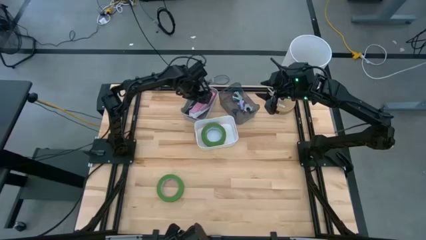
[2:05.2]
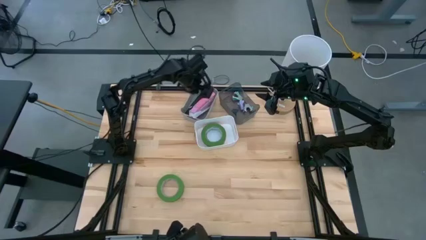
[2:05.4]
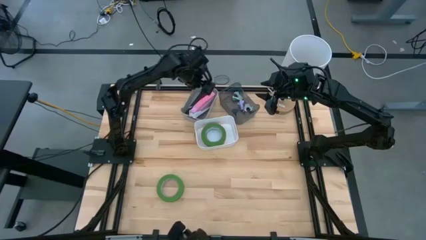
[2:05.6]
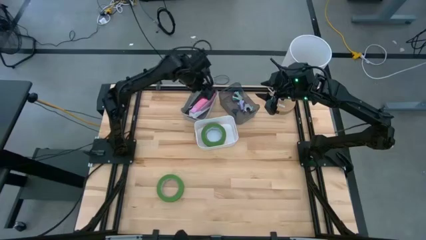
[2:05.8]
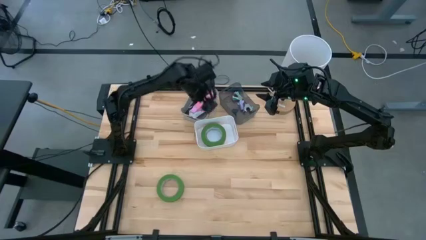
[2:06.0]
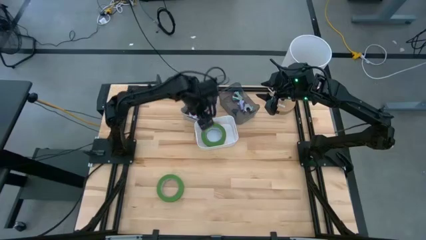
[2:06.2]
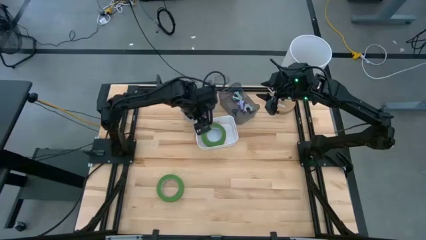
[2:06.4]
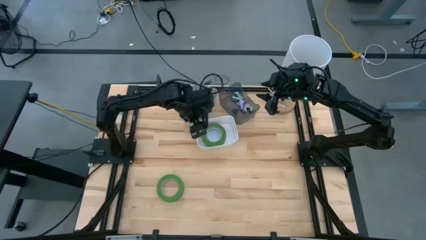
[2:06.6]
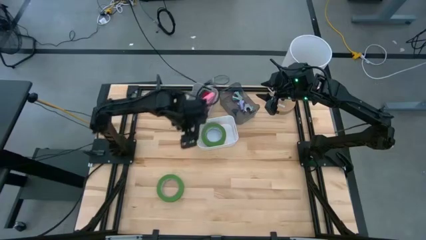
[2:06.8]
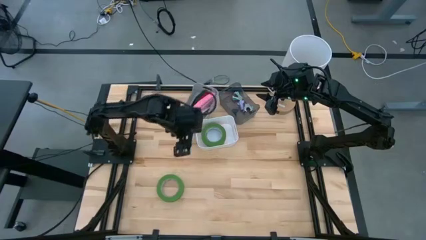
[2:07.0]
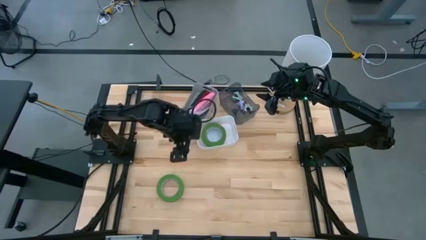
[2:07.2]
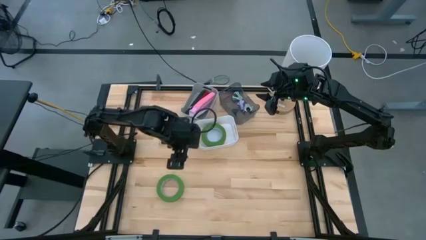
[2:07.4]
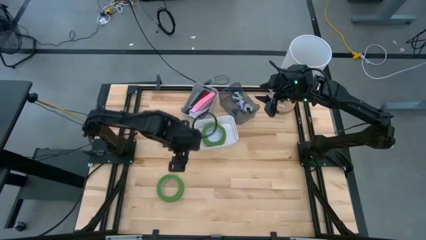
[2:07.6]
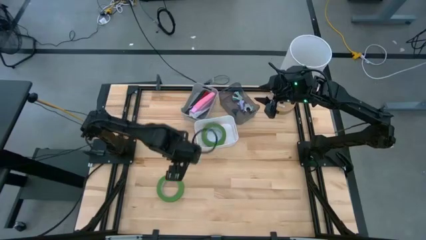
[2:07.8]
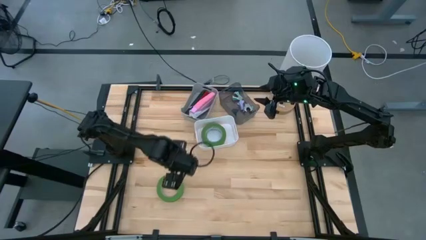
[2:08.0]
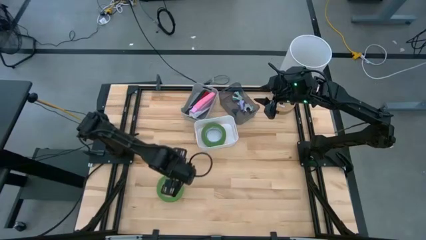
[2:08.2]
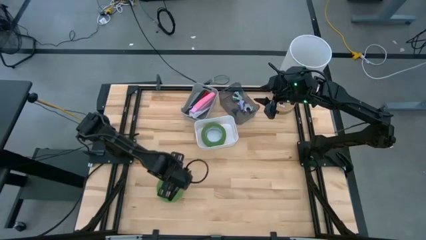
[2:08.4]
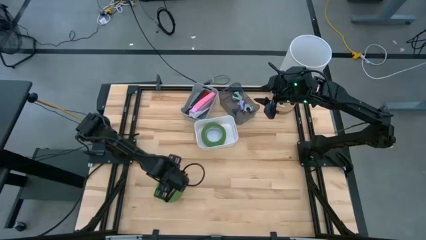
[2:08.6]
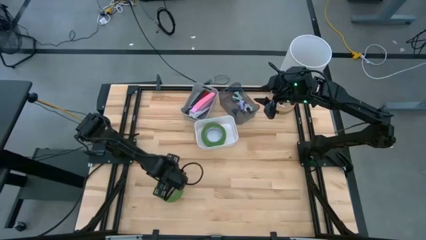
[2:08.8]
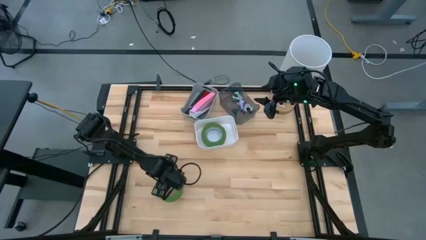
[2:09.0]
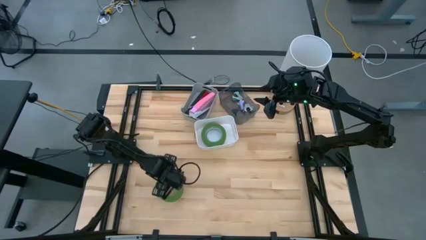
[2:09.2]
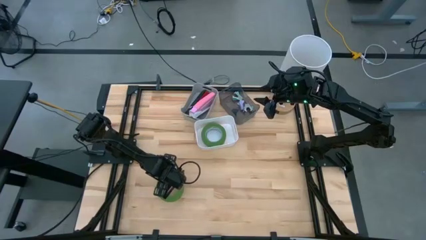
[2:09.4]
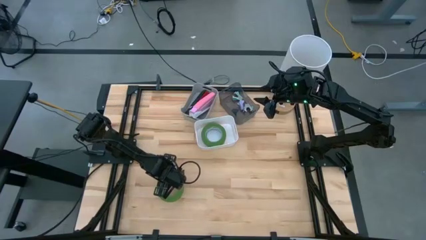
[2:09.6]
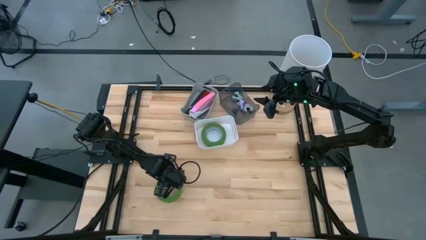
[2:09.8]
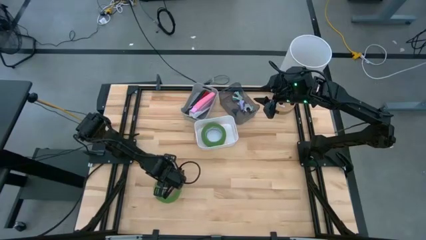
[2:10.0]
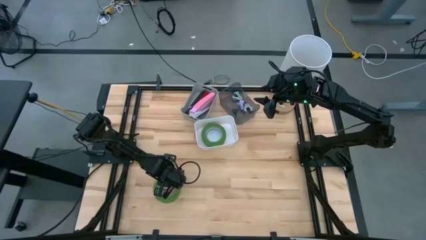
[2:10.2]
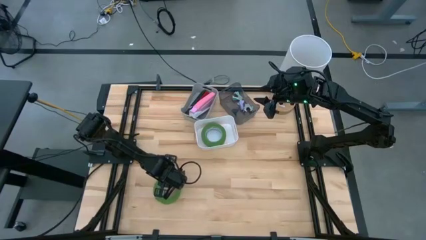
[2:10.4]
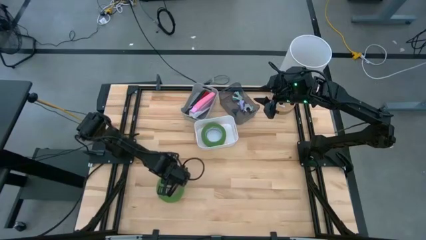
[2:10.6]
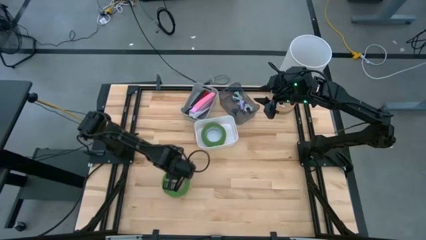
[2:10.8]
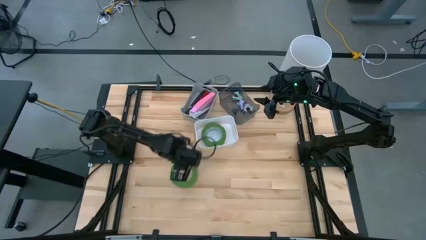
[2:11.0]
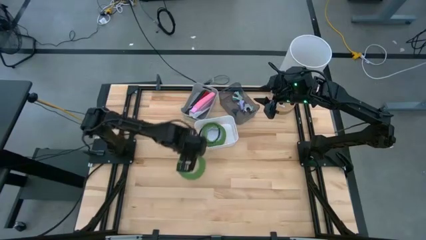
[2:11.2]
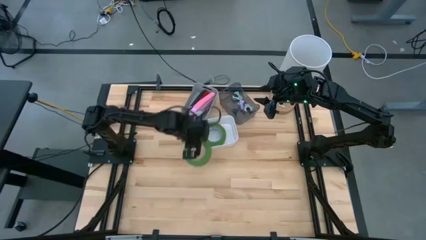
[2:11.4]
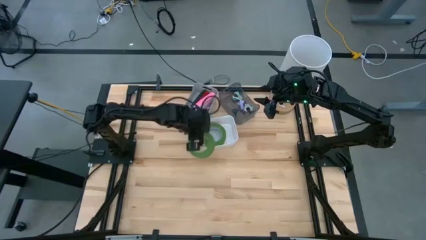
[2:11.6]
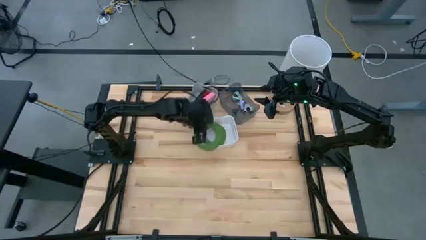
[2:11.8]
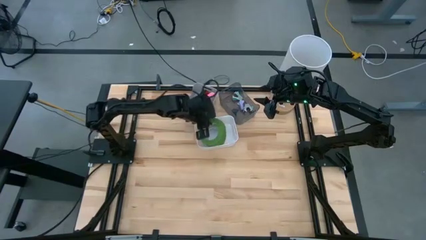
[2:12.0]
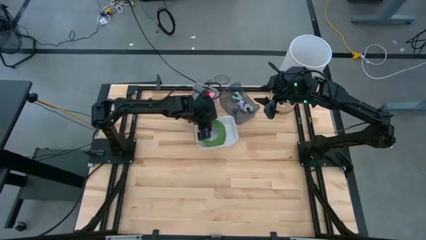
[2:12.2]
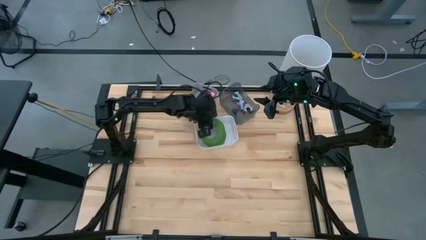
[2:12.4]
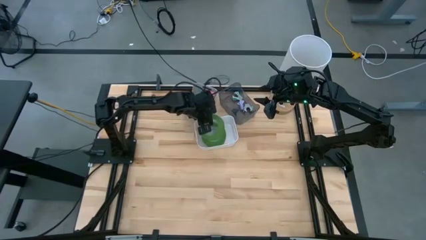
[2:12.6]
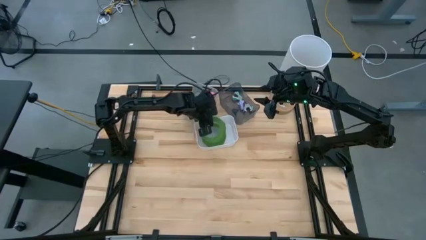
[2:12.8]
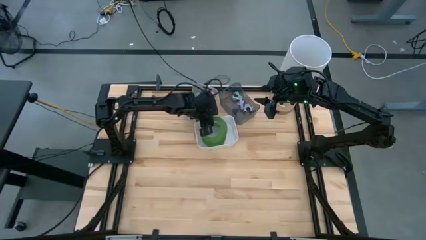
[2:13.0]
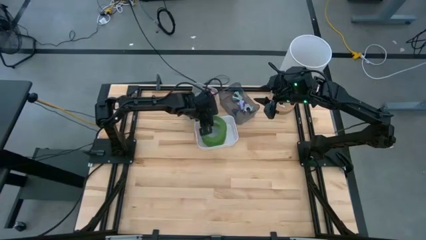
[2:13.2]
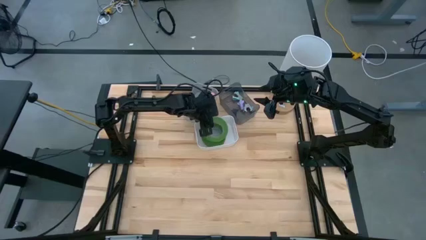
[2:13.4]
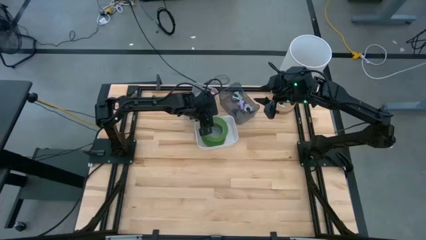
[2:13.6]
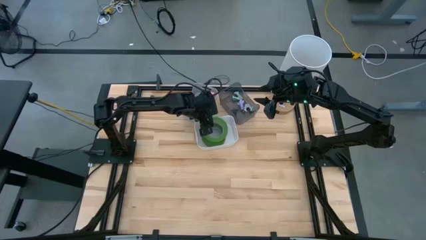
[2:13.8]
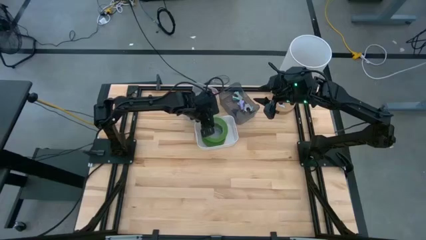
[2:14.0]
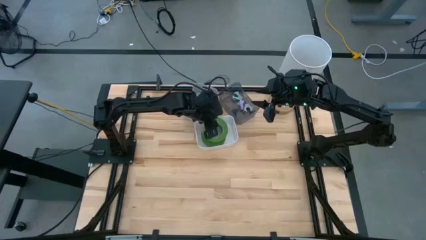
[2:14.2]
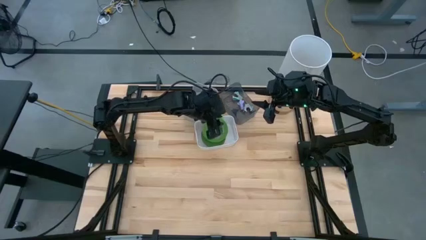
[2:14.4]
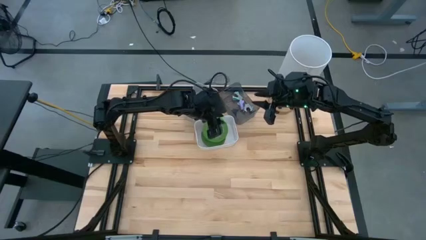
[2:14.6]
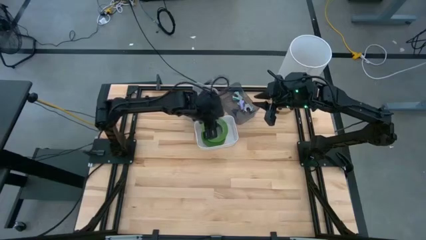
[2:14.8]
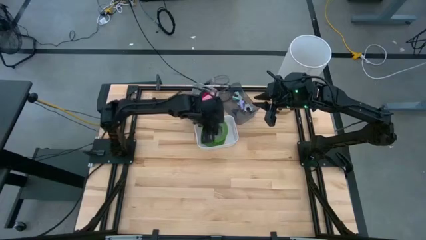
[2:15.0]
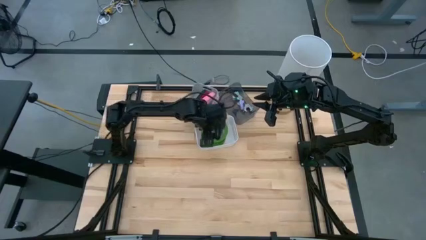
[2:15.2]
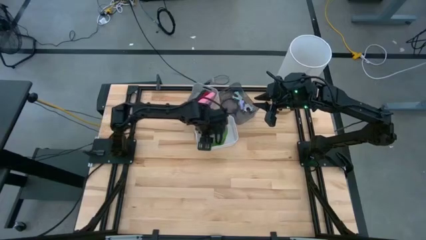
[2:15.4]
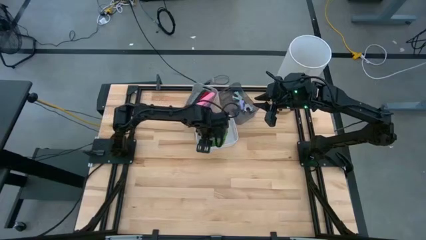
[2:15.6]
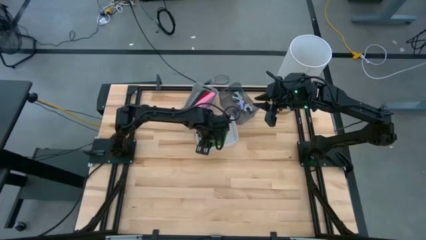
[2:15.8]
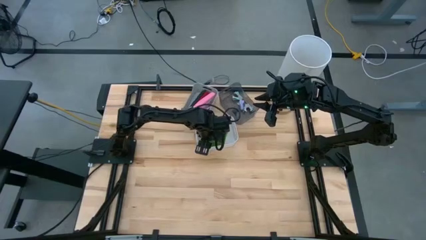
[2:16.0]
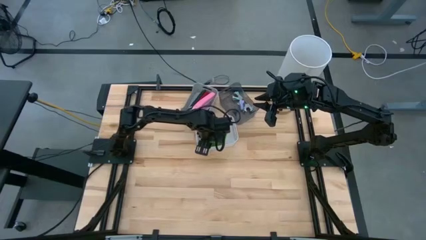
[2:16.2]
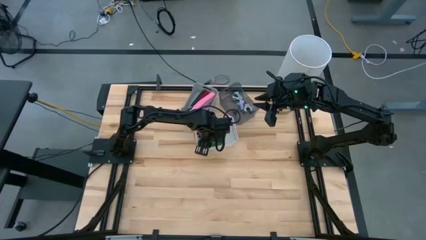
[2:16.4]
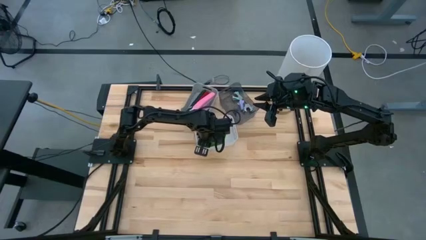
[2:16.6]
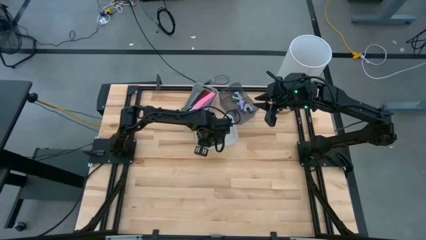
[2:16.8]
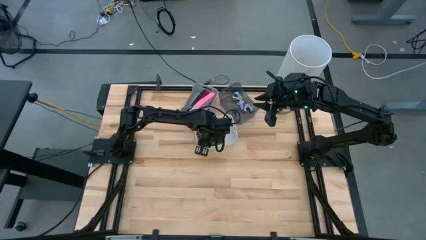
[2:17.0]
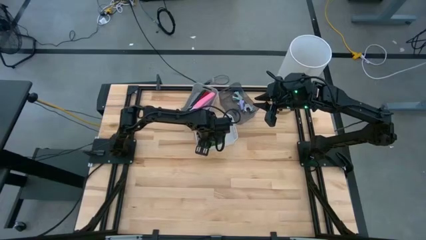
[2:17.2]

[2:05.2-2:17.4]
Task: Pick and place Stapler, Stapler remover, tape
Put the green tape into the white bin
